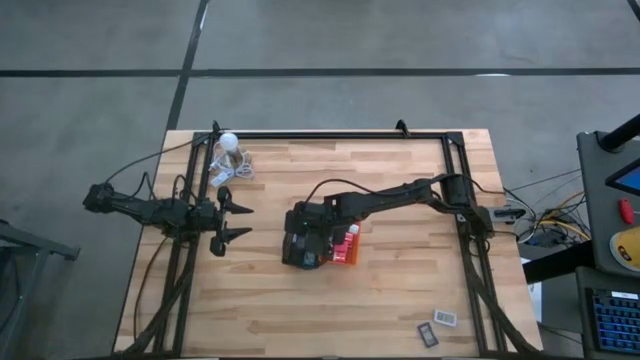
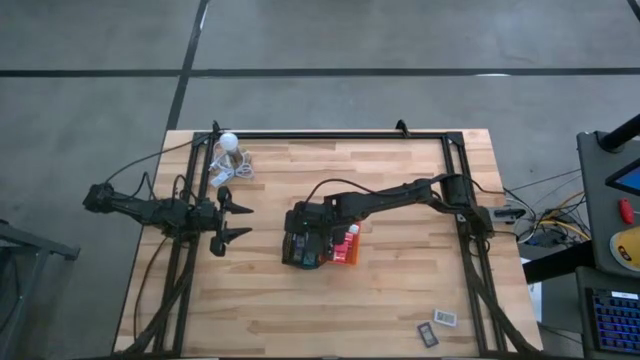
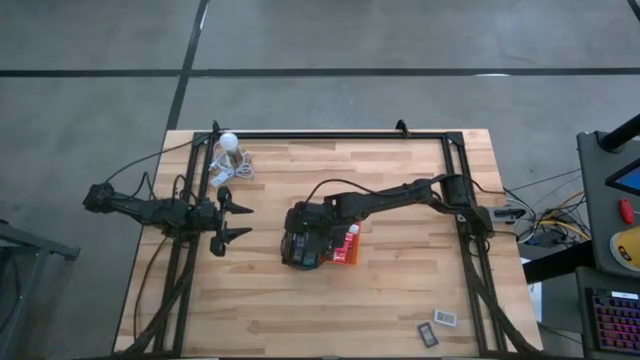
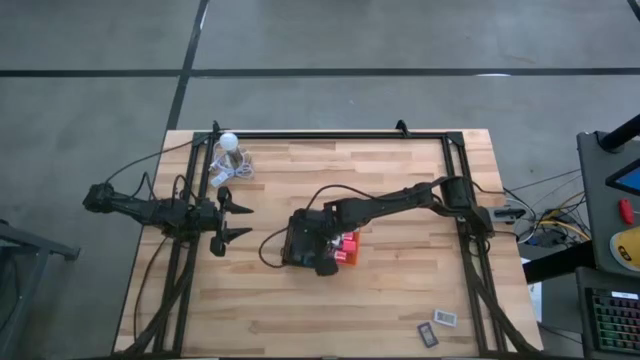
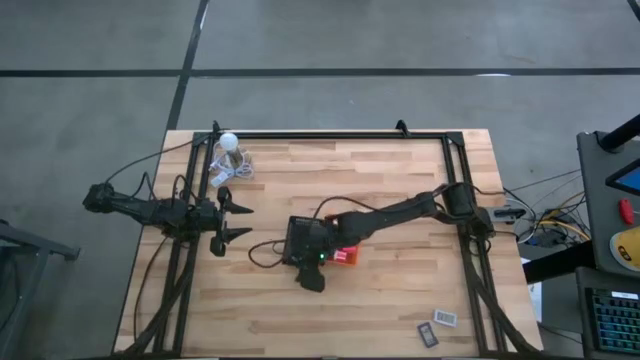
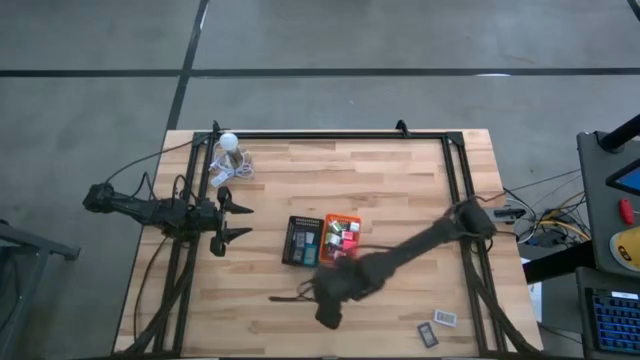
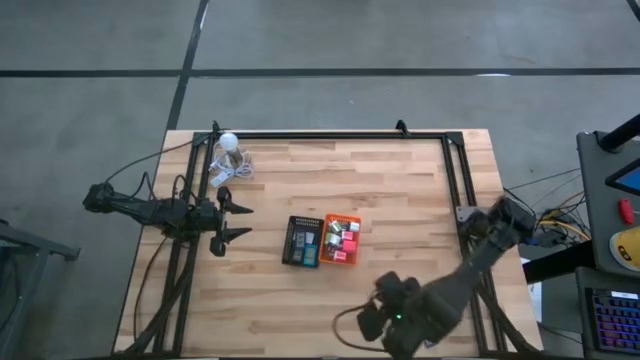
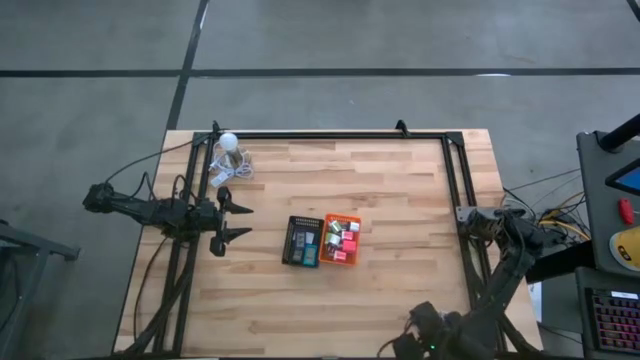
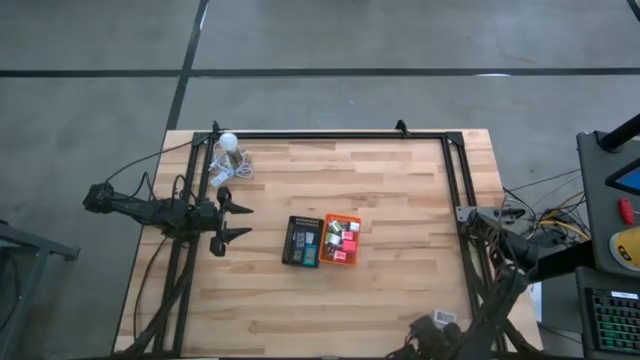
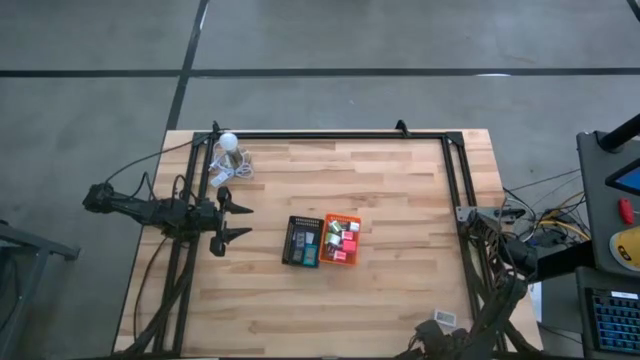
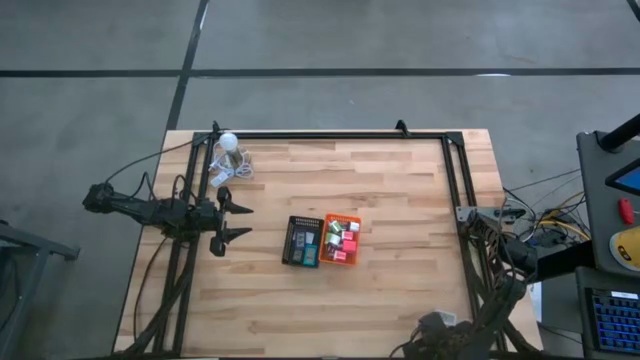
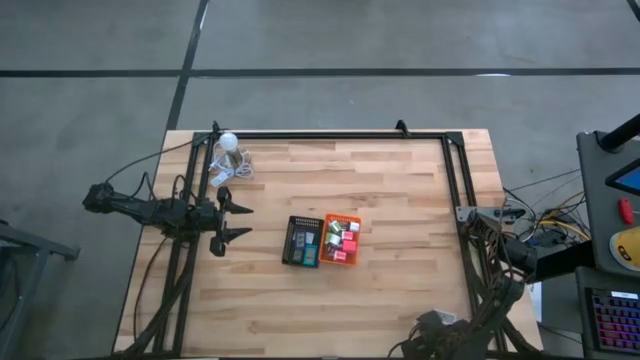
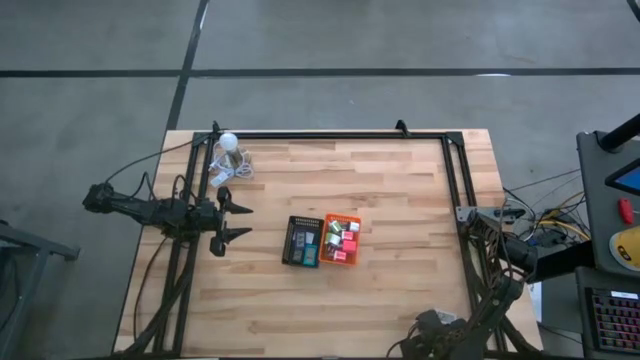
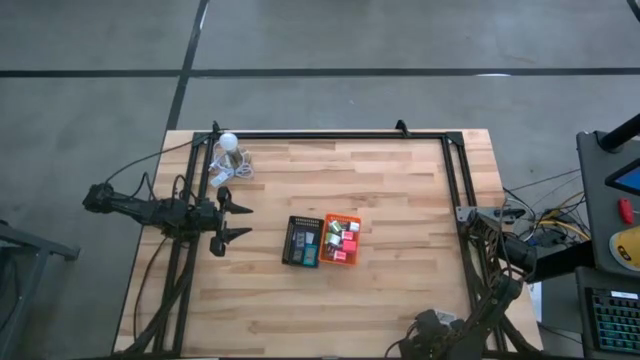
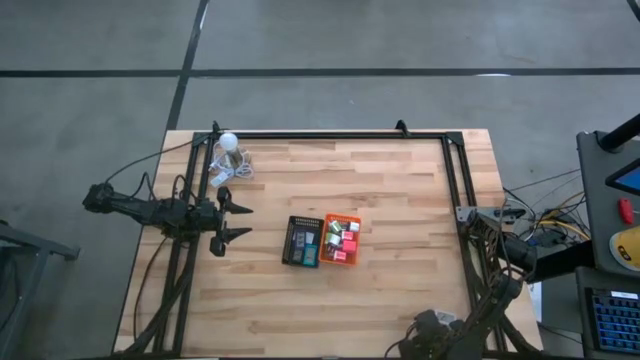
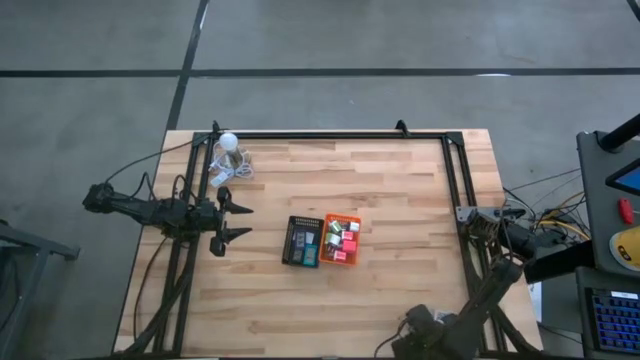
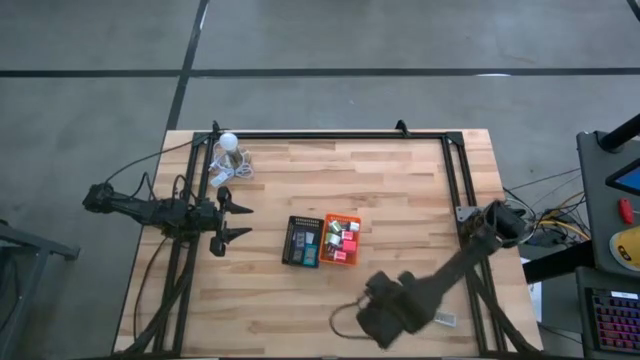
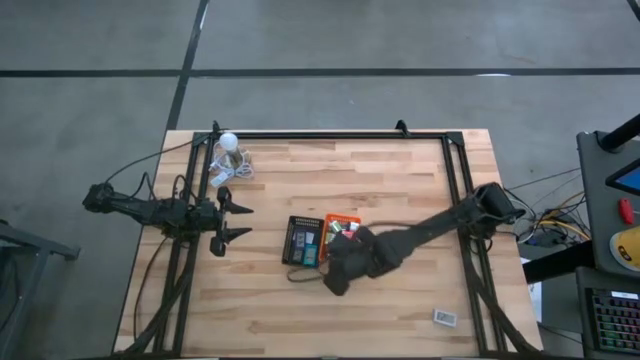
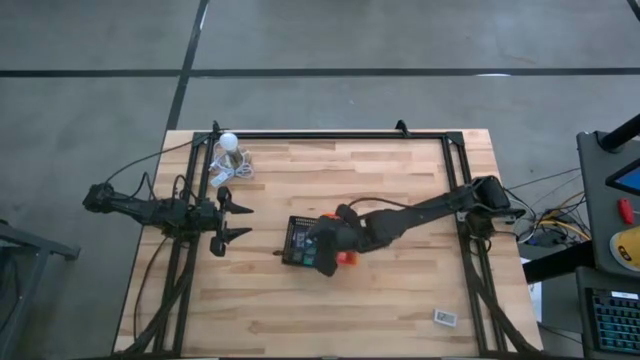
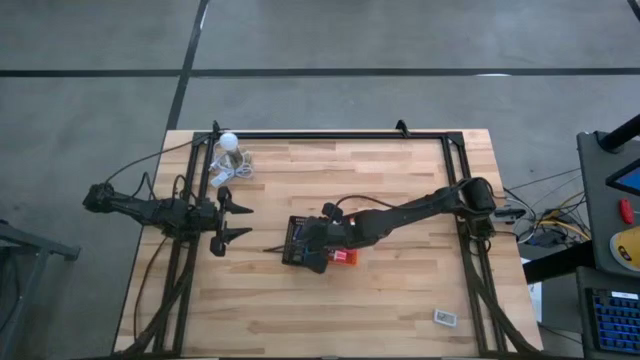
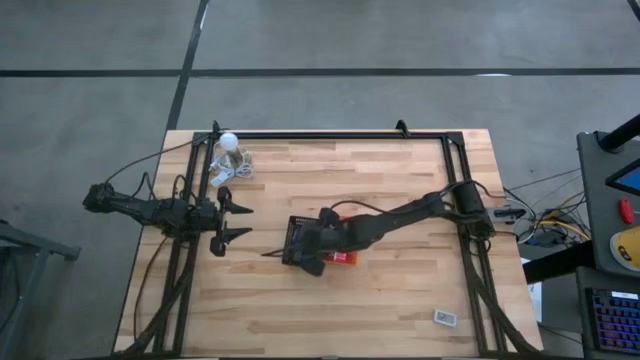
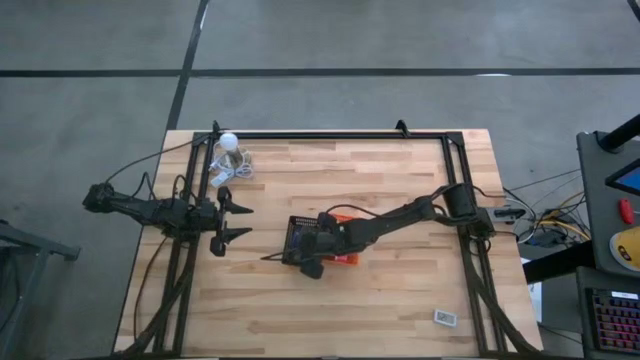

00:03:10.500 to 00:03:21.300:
Task: Pick & Place Office items
Put the dark blue timer into the black bin

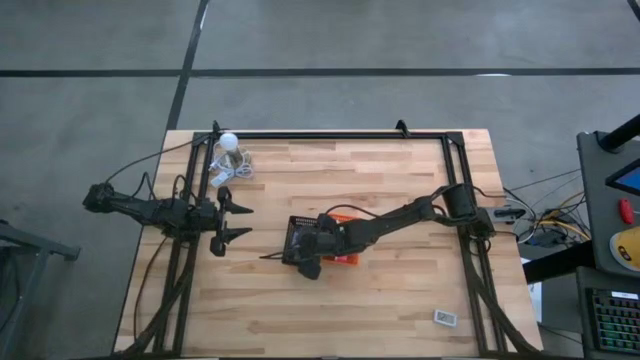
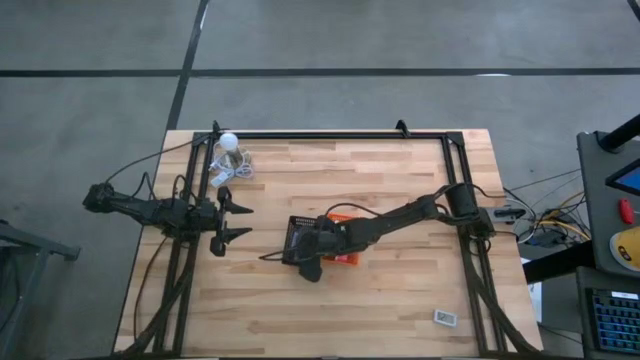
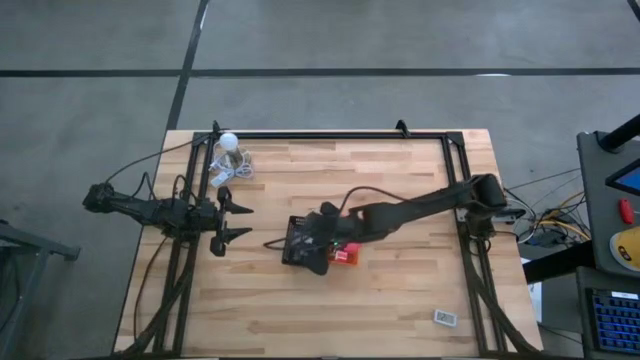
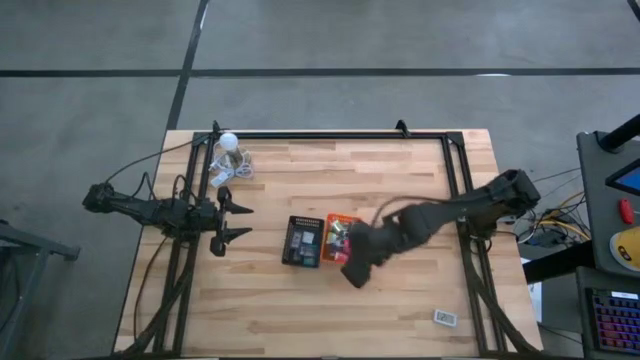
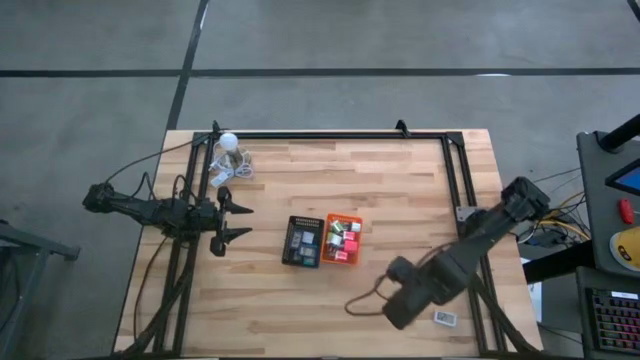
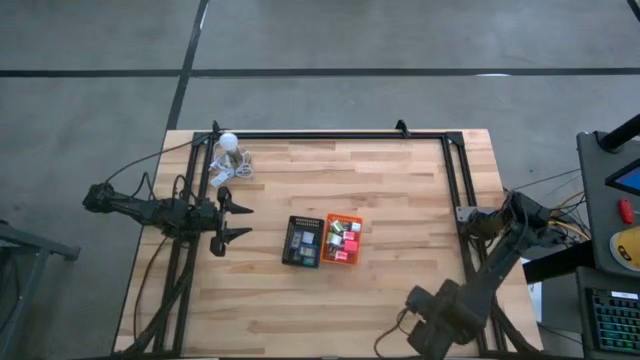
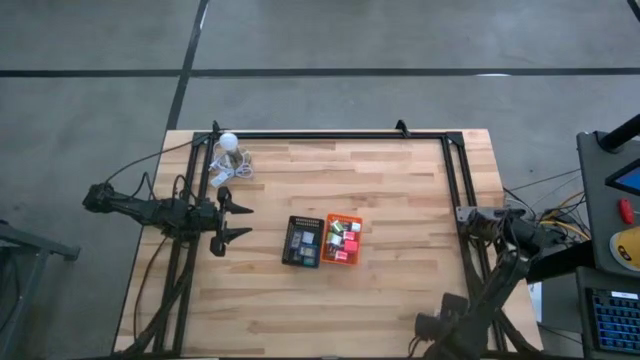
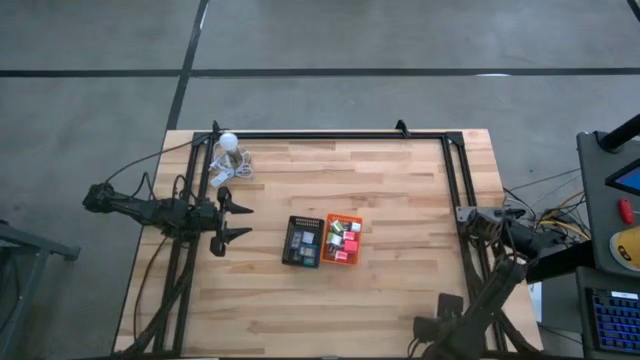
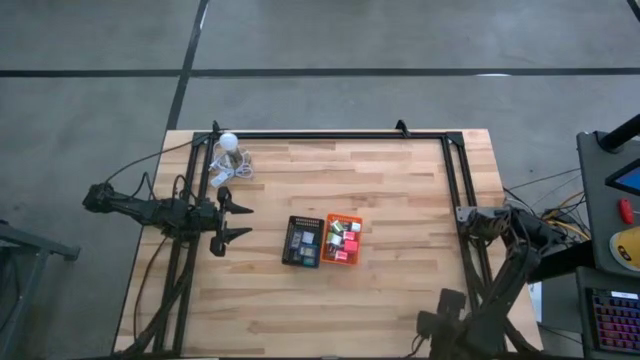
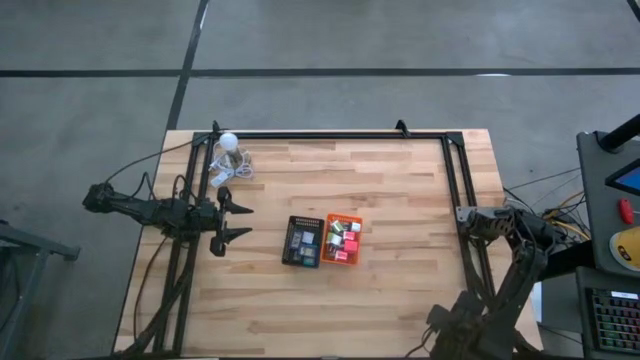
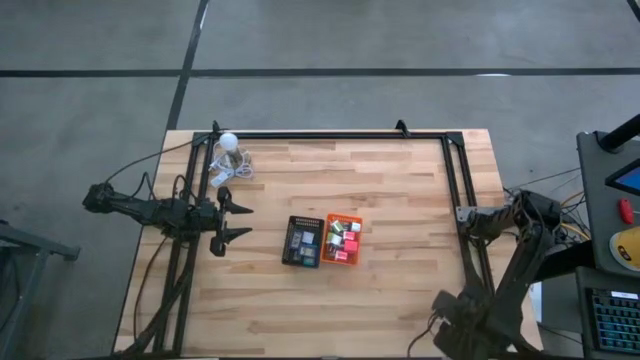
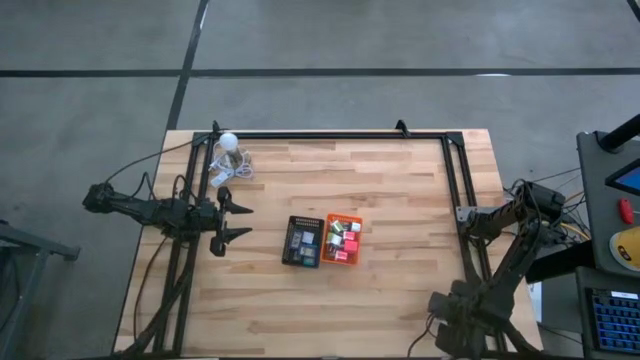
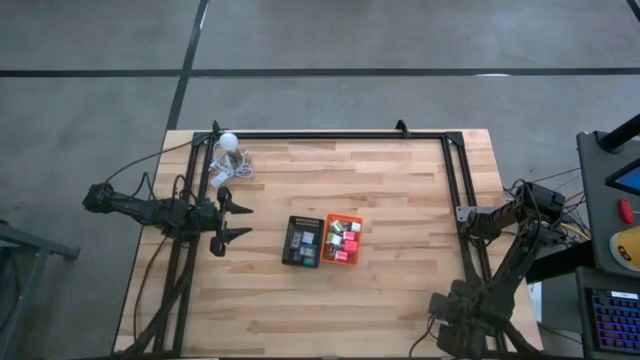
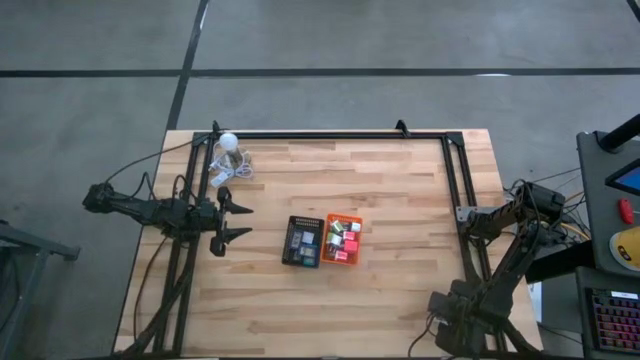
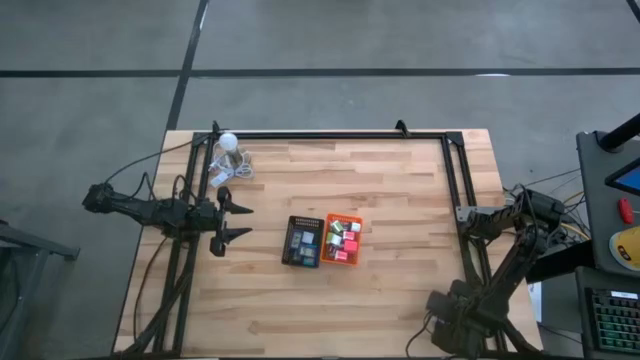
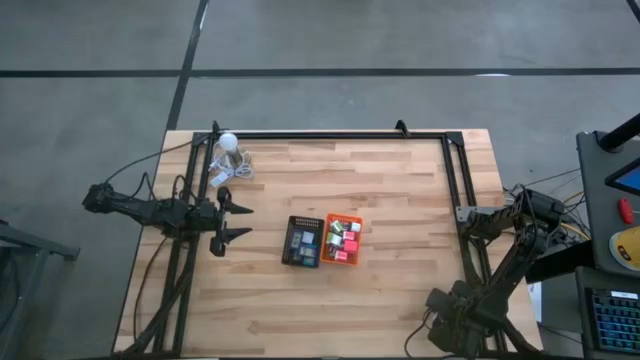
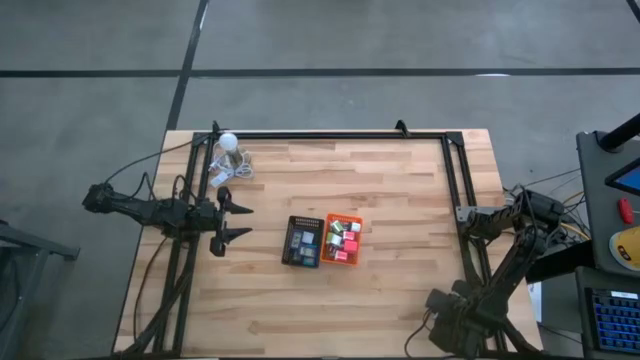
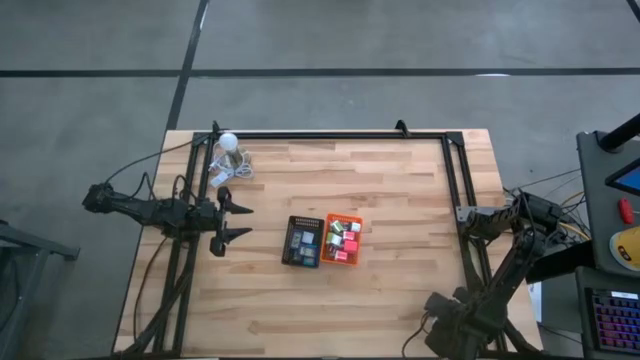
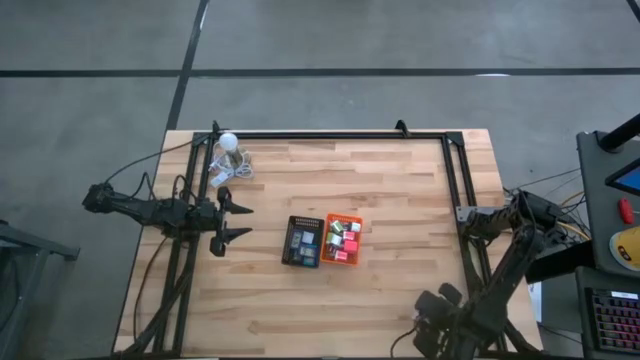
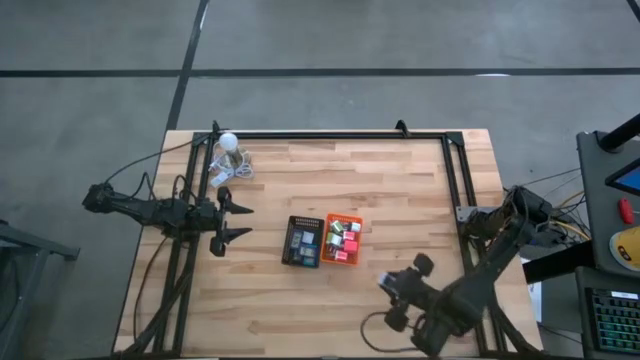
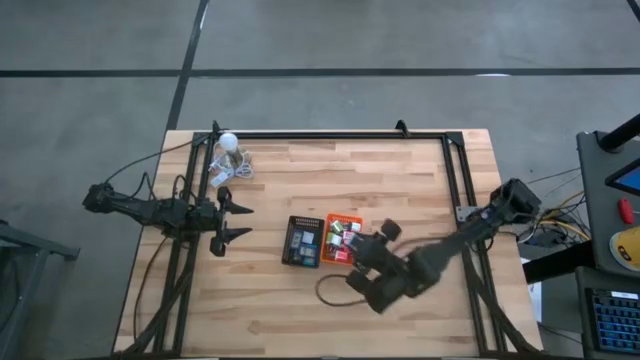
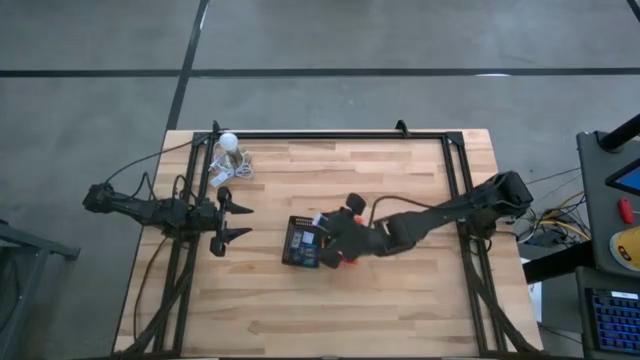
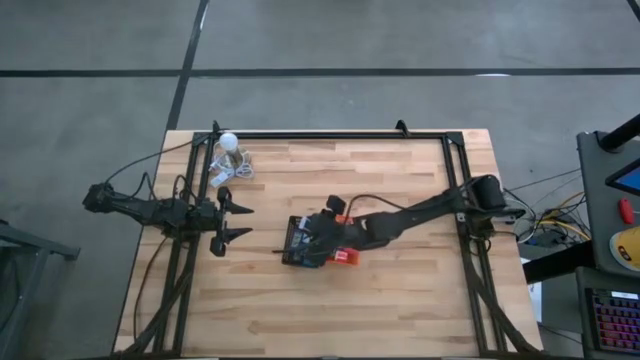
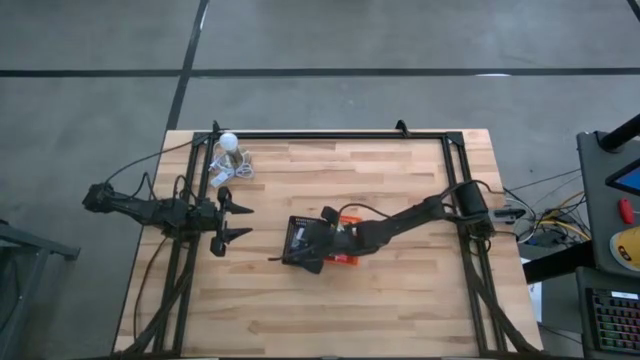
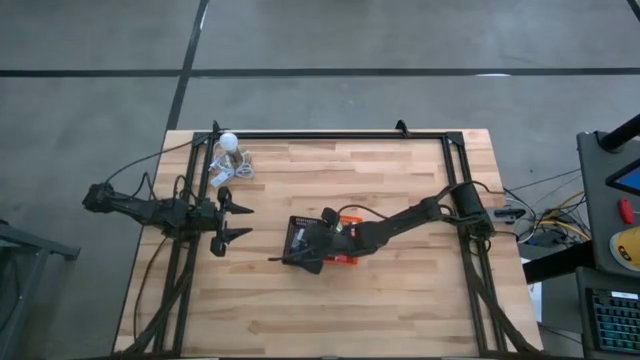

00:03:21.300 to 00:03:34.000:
Put the white timer into the black bin
